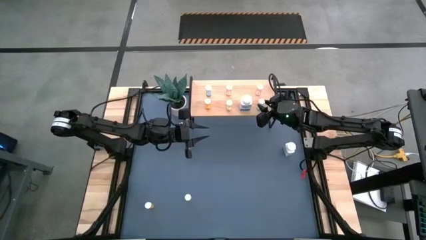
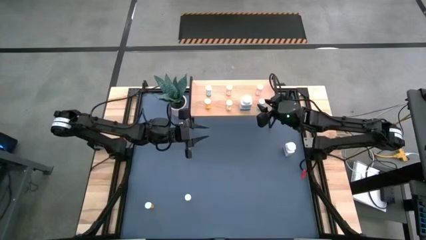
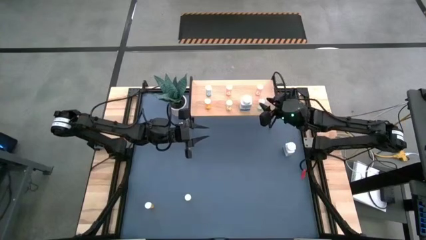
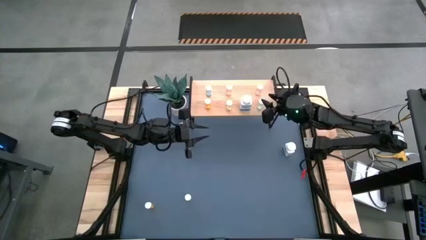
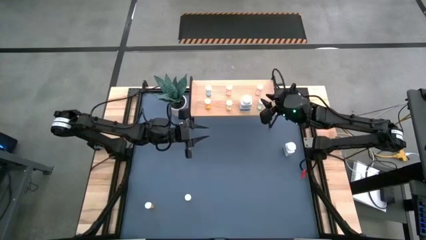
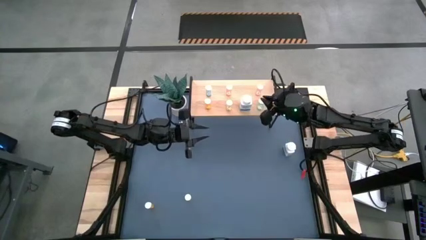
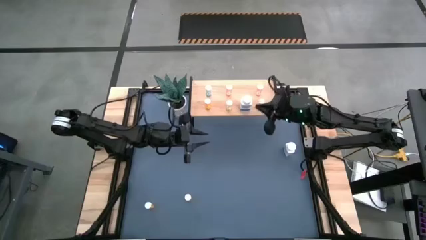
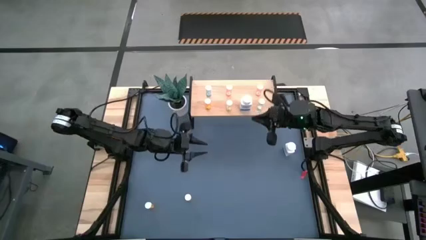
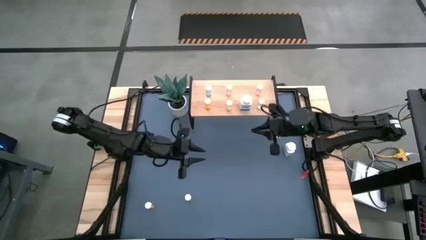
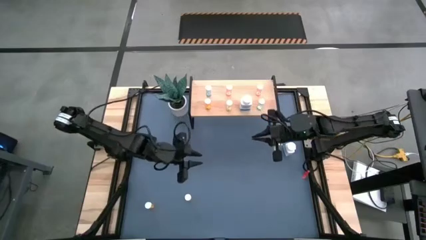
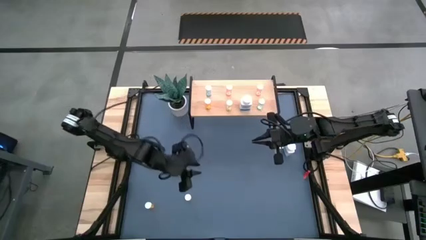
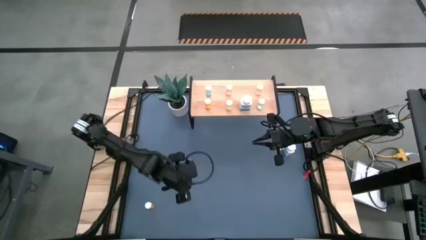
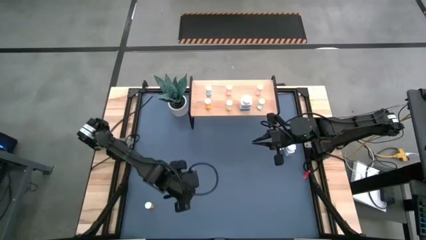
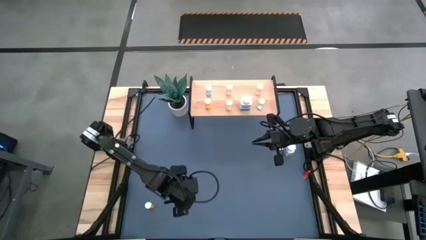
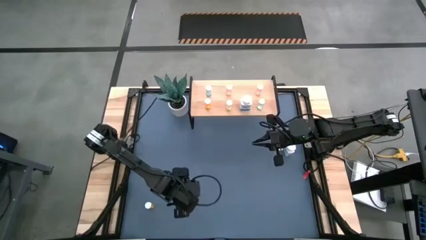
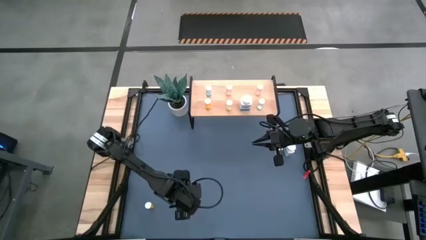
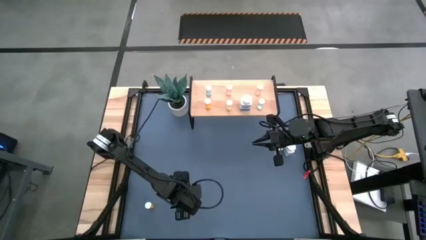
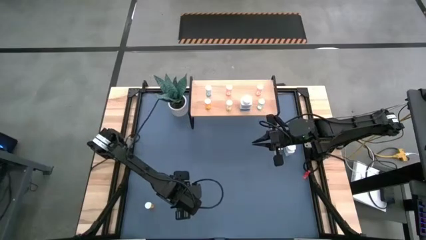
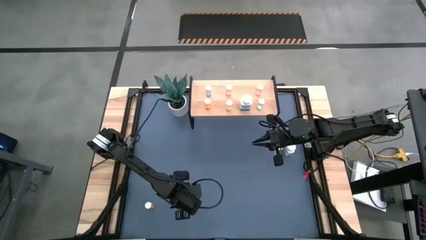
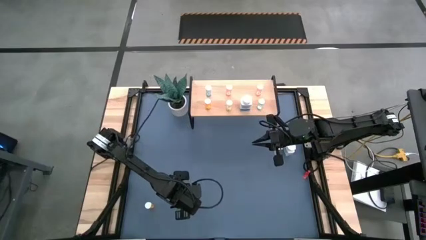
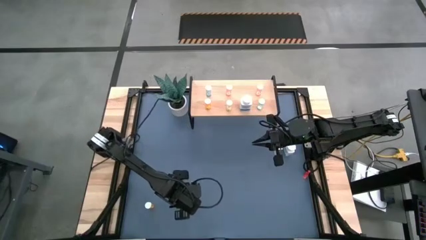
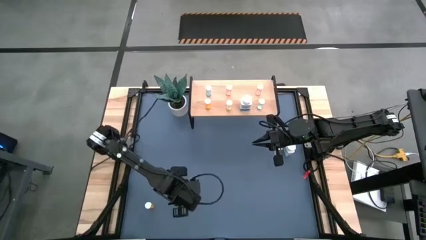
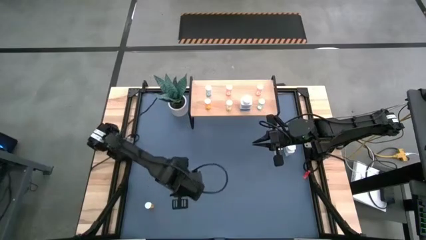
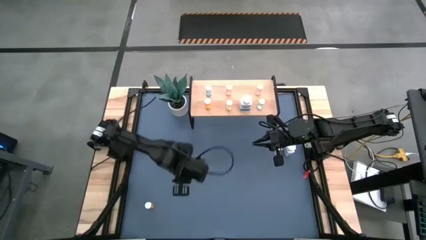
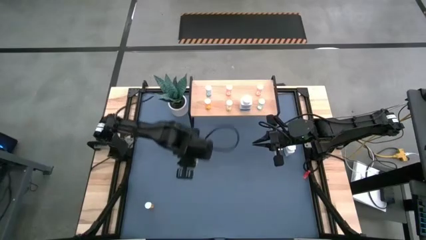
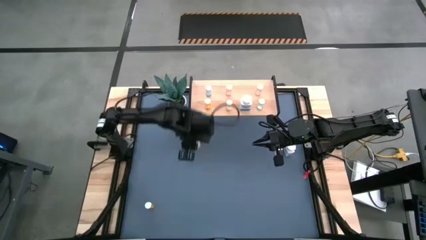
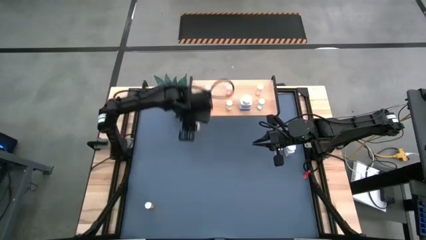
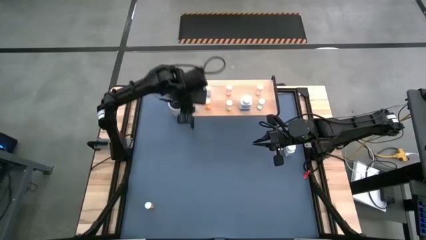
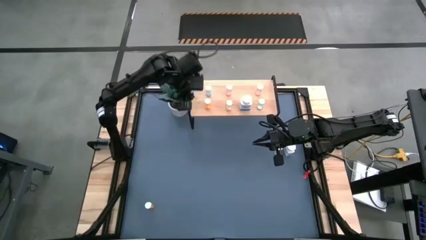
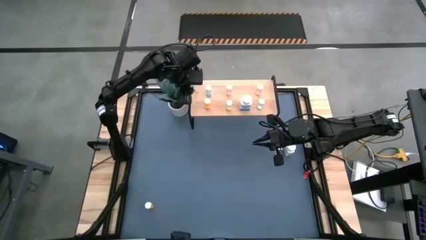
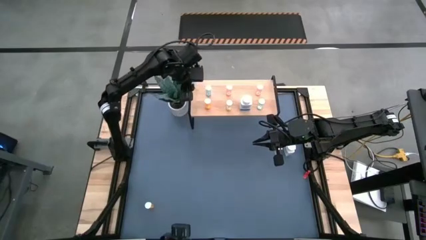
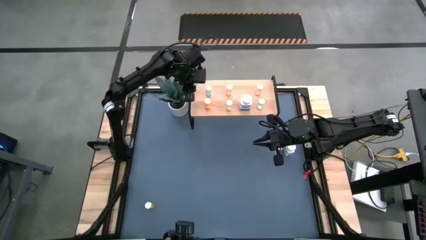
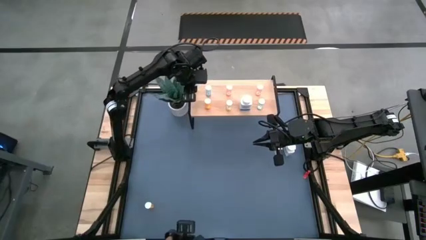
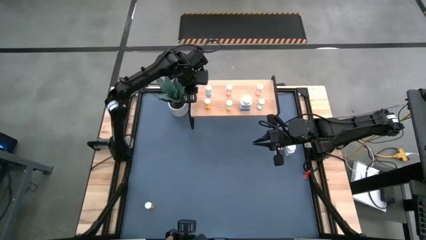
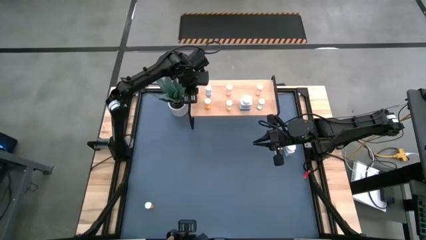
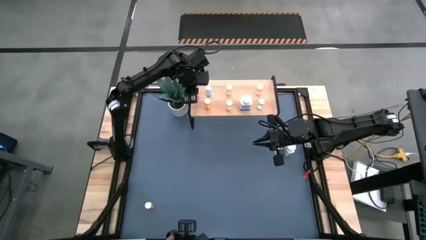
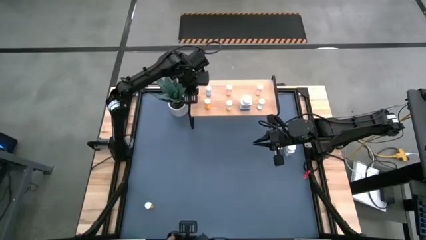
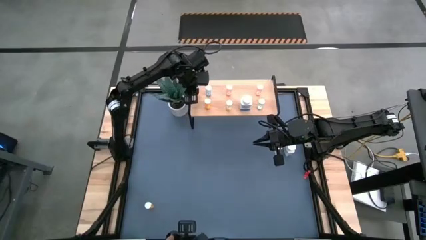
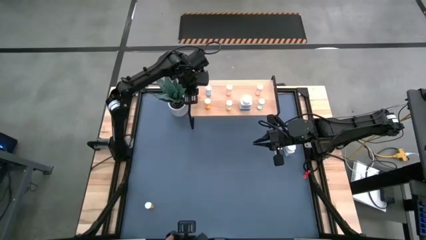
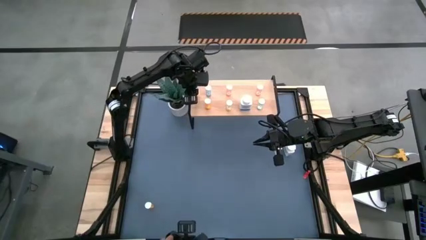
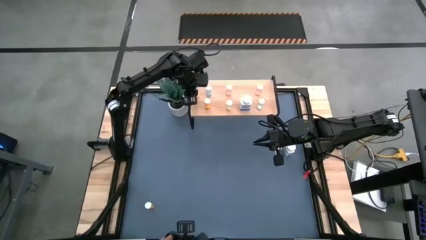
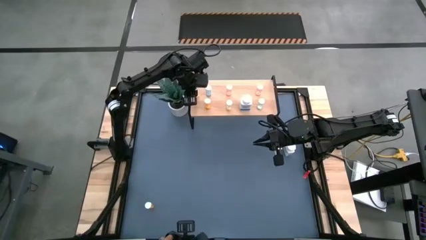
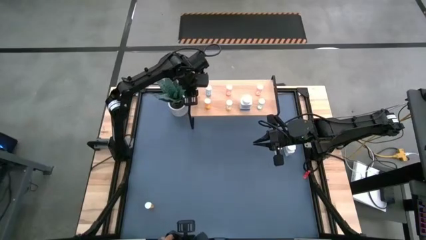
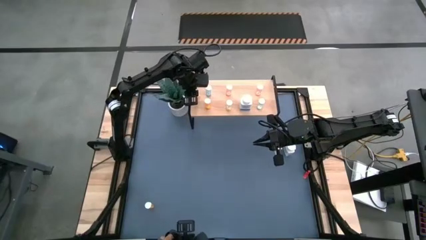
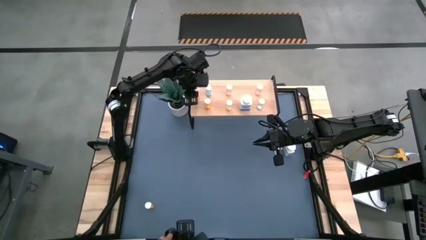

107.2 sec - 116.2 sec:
Task: Pick and place medicine bottles onto shelf by color
Put the yellow medicine bottle on the shelf

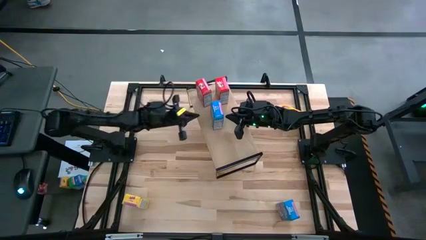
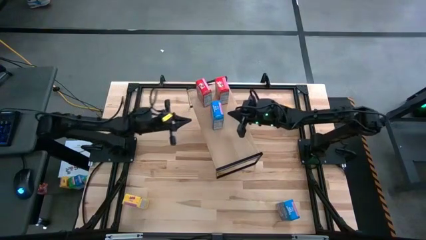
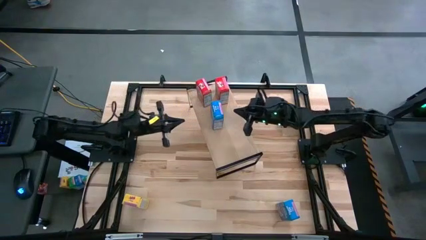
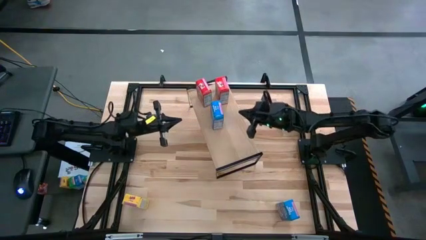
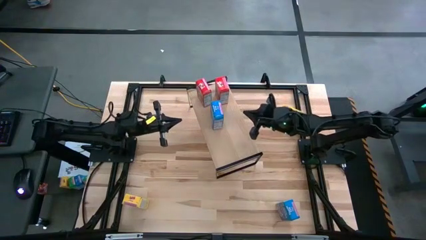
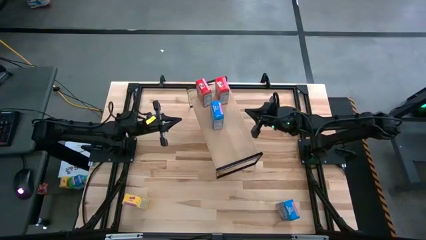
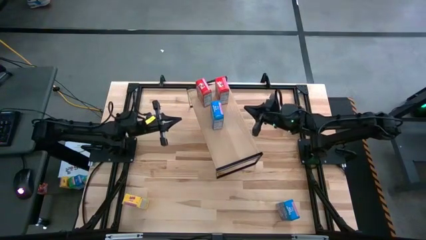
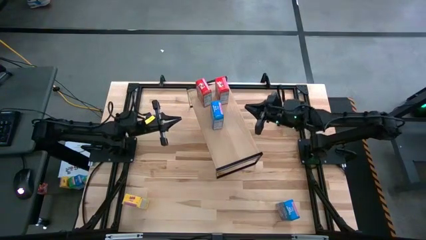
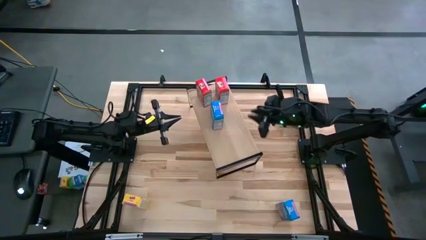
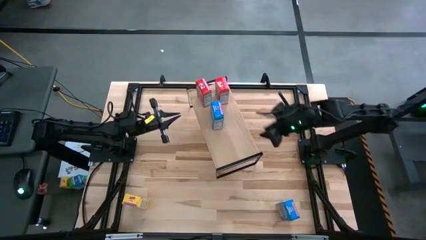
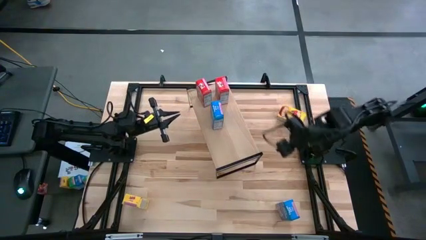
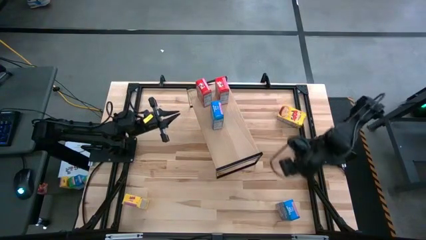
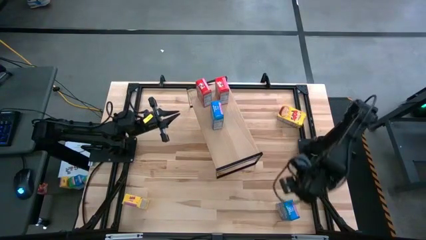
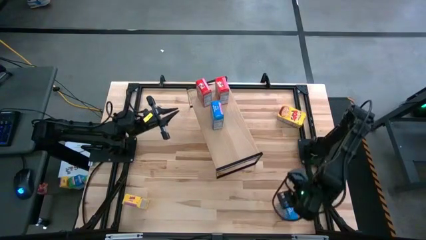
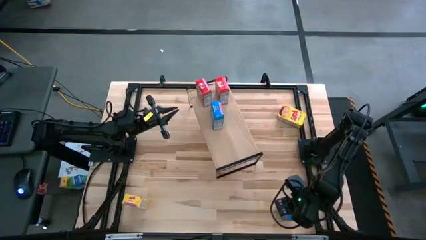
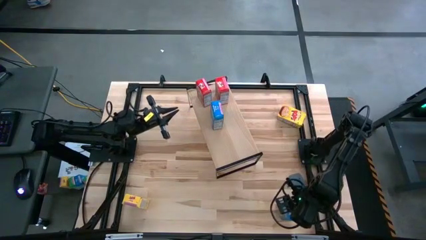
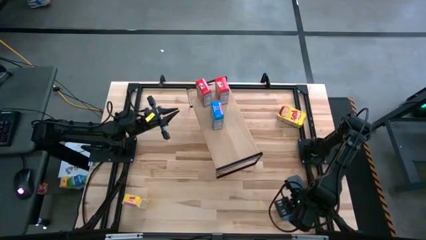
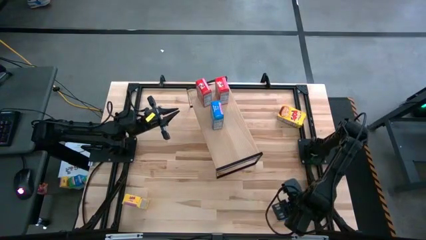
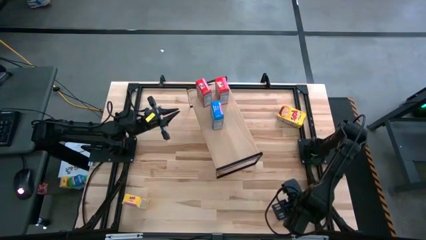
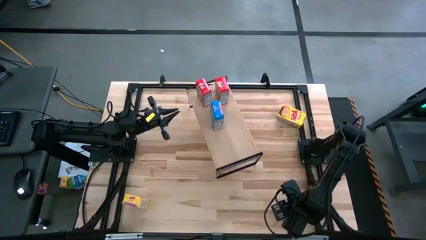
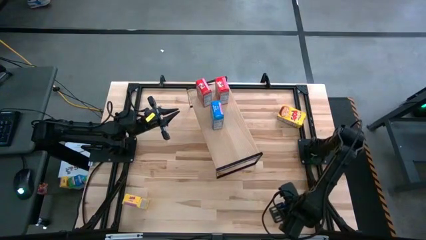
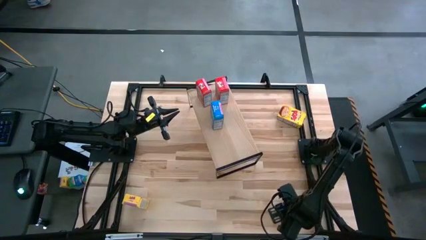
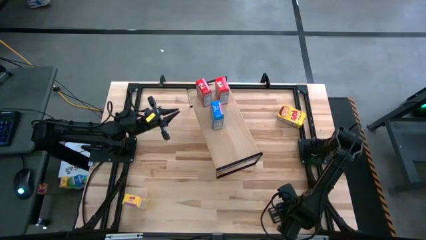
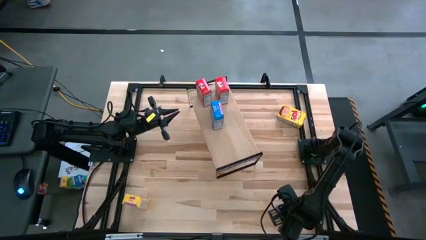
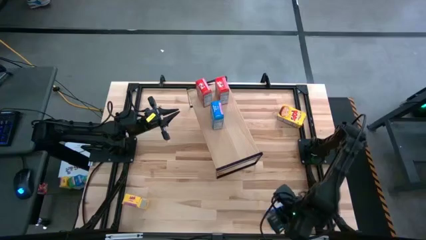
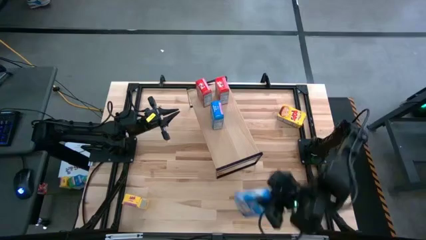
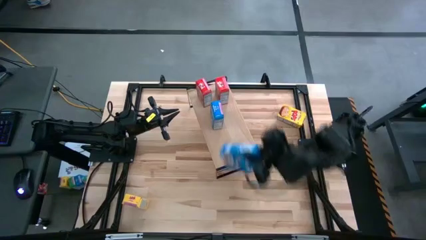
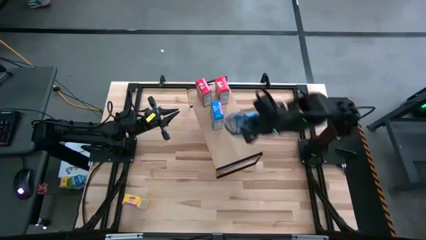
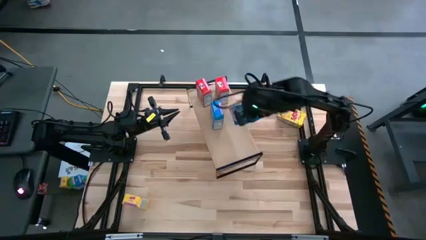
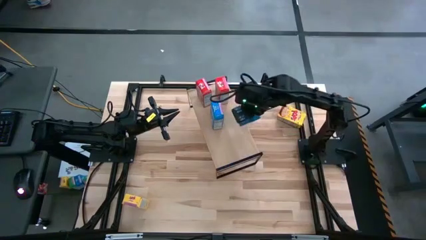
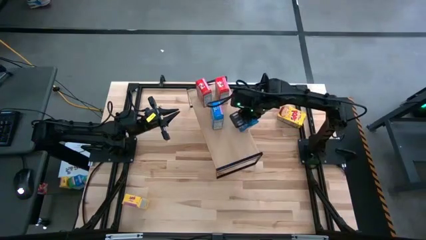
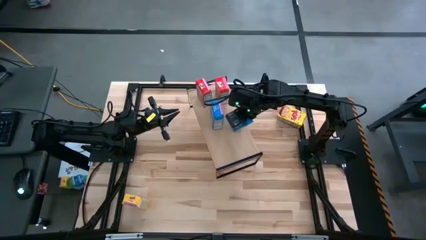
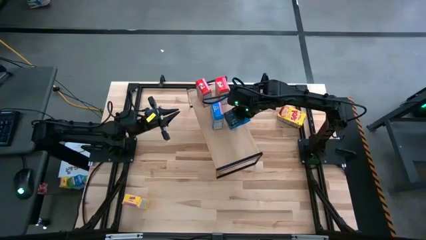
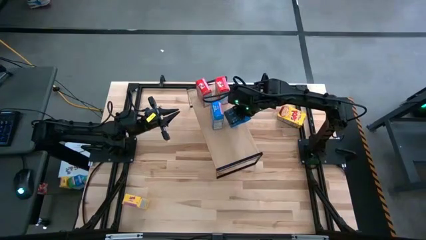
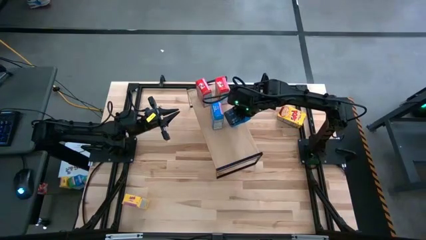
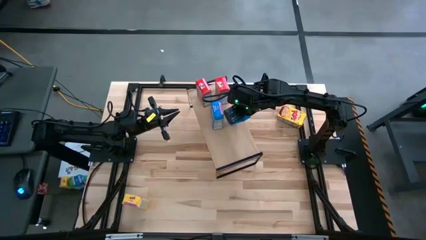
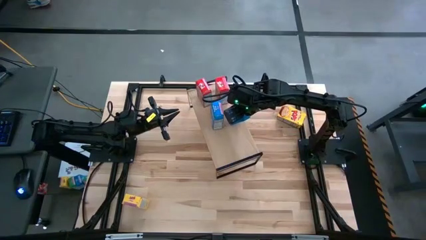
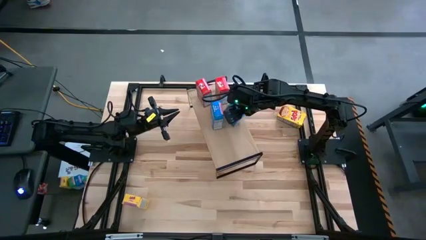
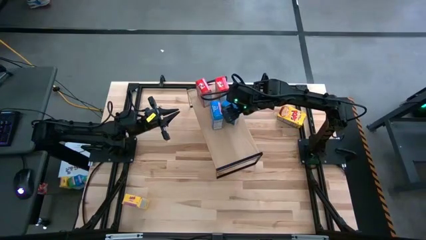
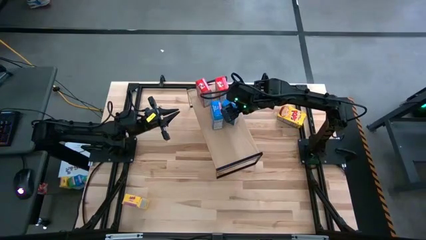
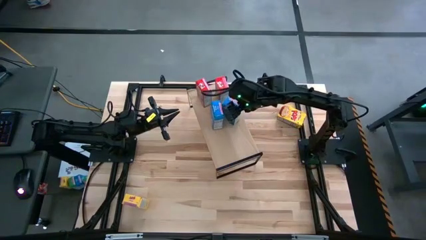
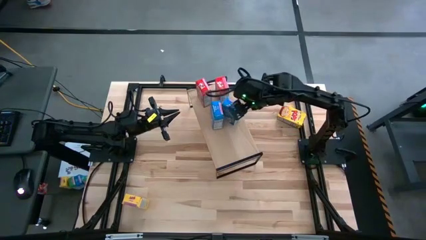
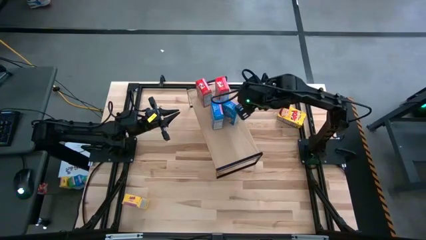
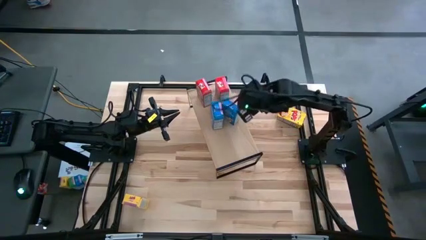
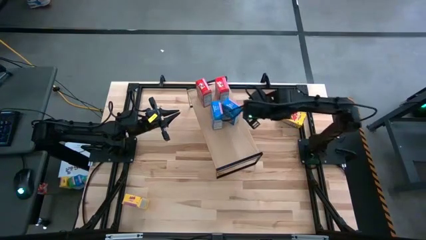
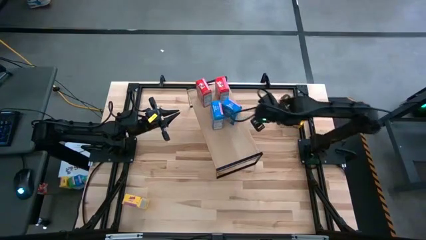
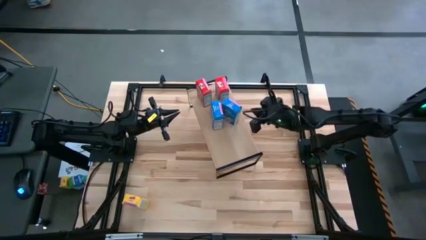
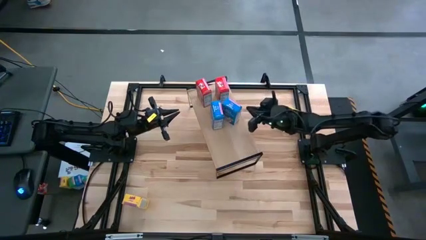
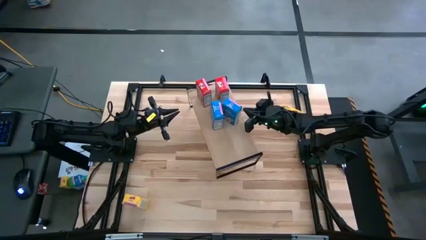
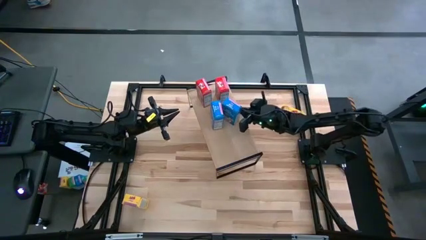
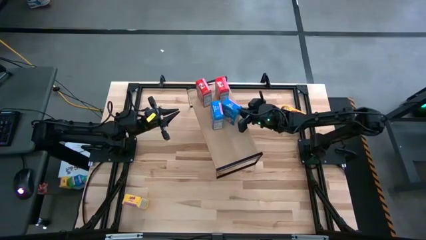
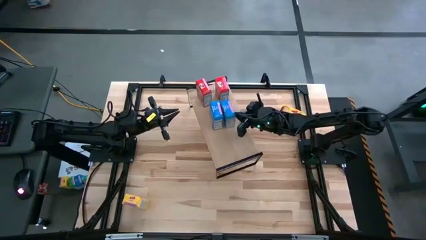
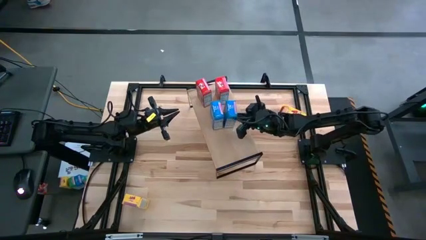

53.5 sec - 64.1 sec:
Task: Stack cereal on shelf
Put the blue cereal box aligned with the other blue cereal box on the shelf
